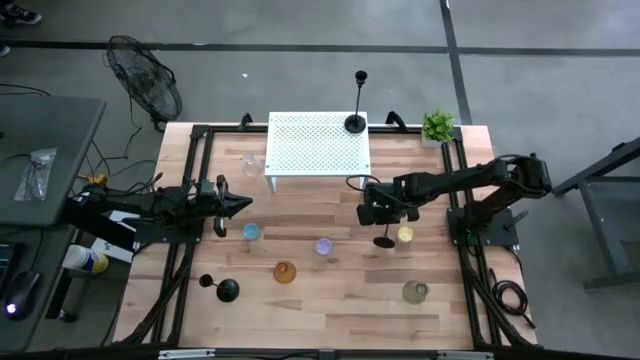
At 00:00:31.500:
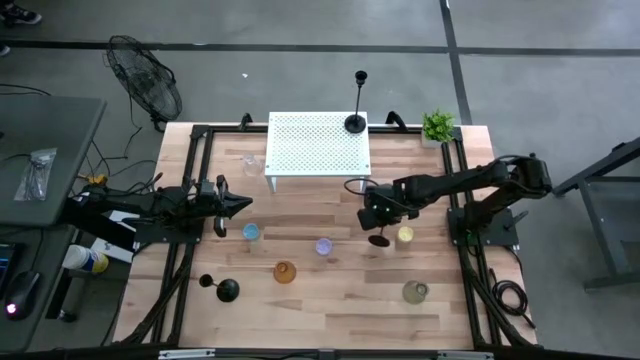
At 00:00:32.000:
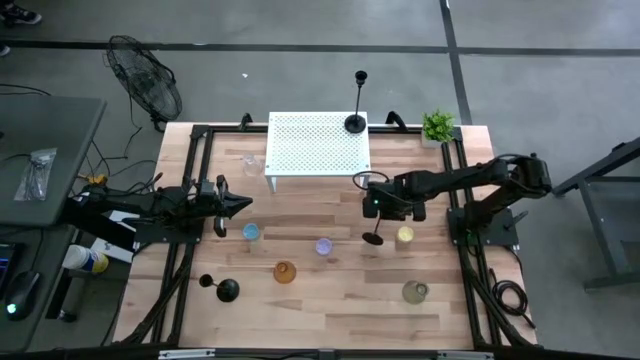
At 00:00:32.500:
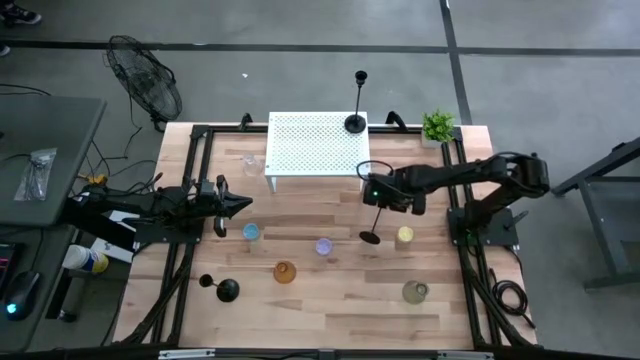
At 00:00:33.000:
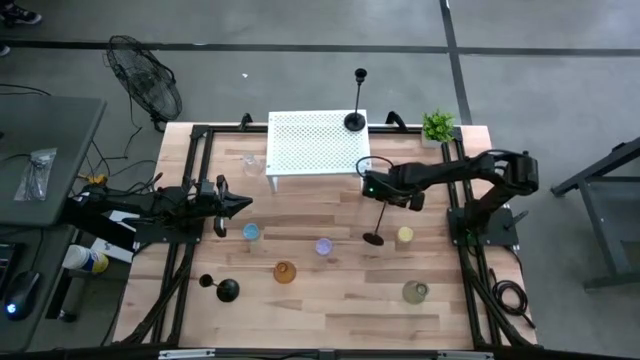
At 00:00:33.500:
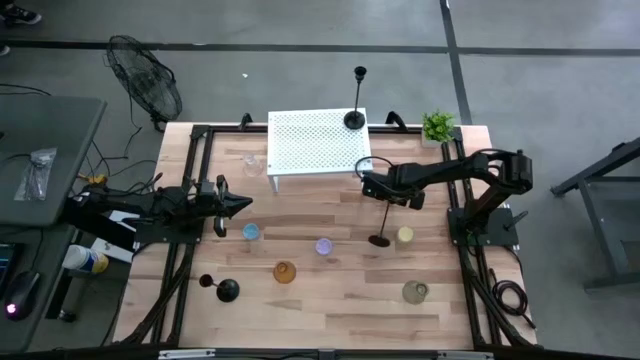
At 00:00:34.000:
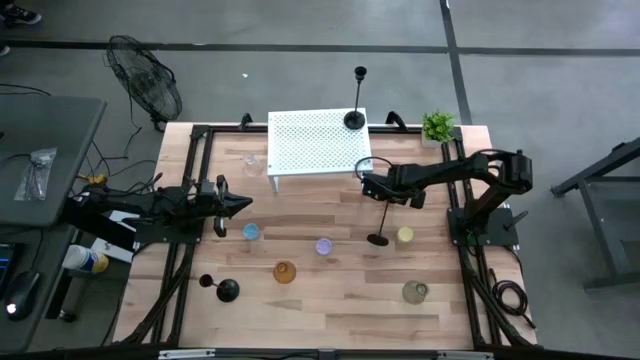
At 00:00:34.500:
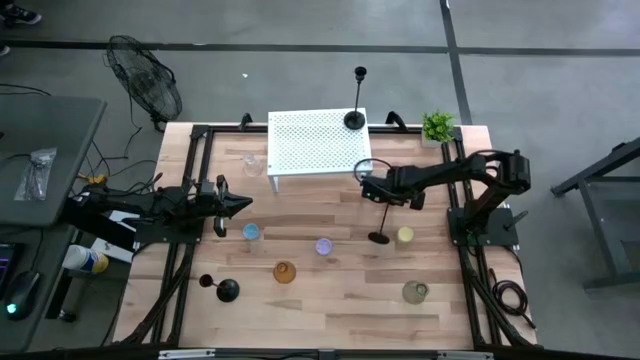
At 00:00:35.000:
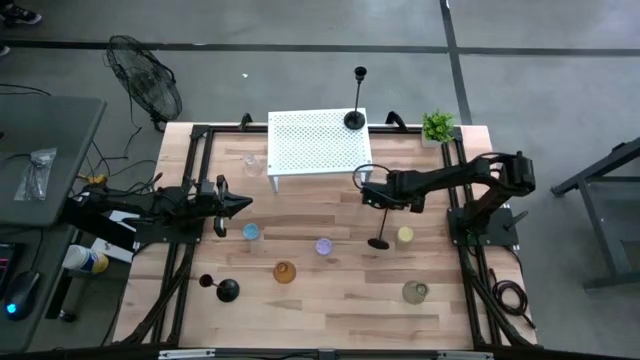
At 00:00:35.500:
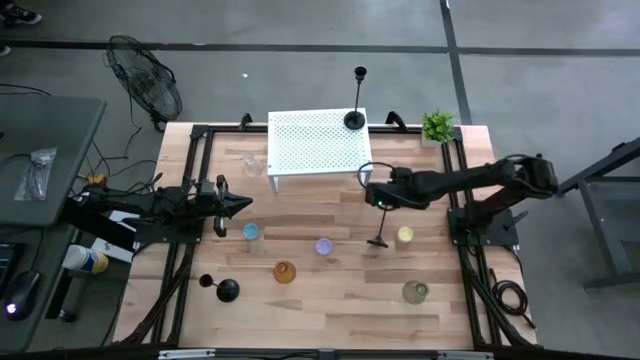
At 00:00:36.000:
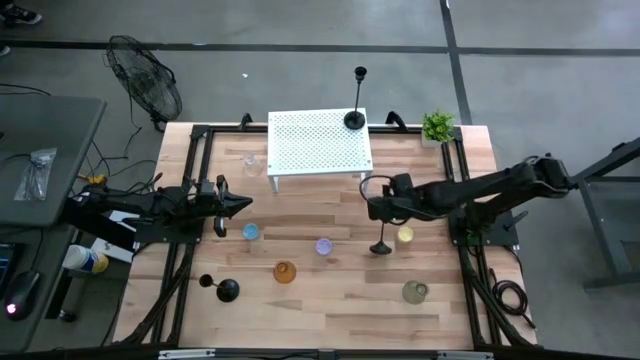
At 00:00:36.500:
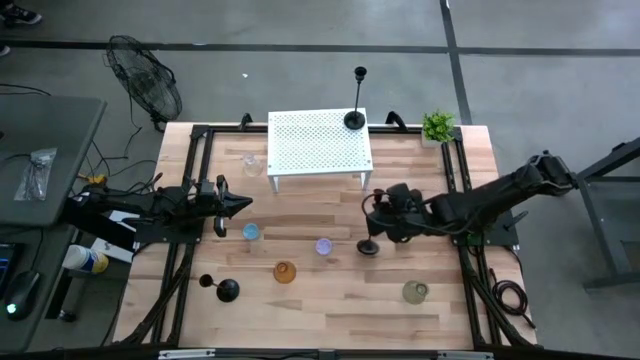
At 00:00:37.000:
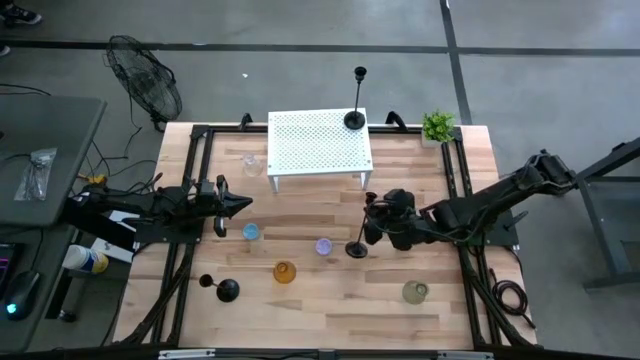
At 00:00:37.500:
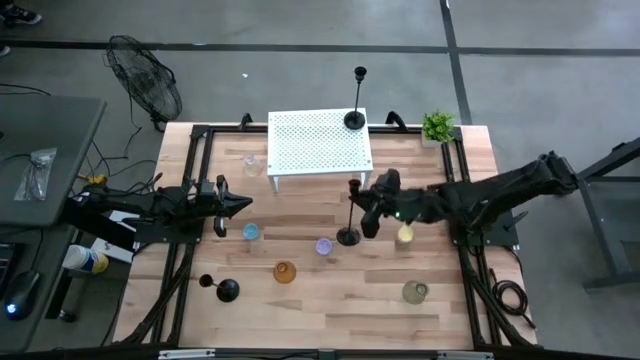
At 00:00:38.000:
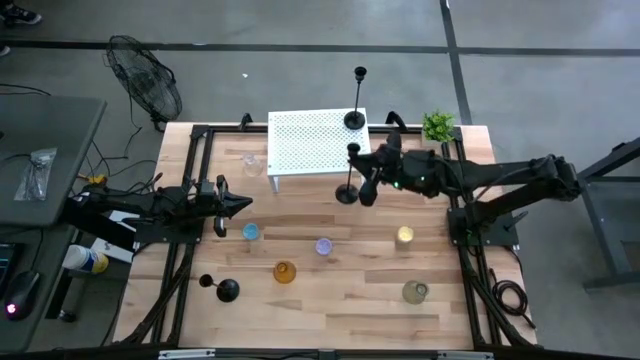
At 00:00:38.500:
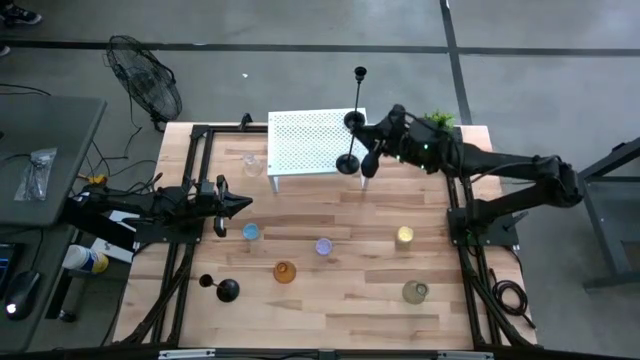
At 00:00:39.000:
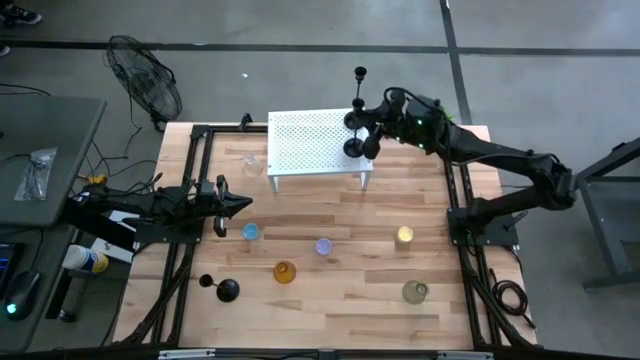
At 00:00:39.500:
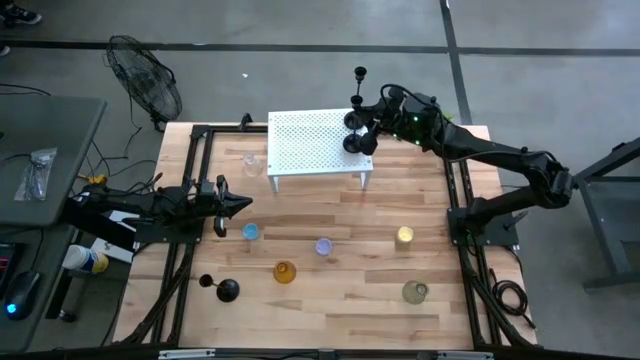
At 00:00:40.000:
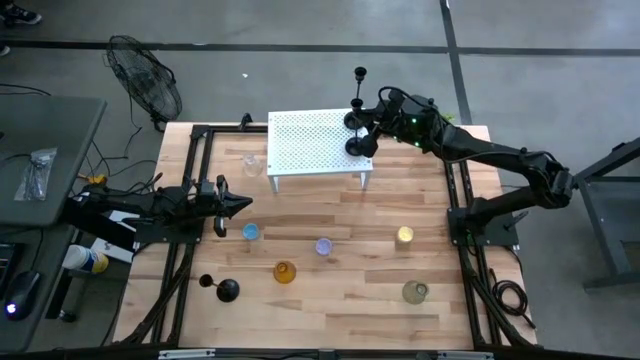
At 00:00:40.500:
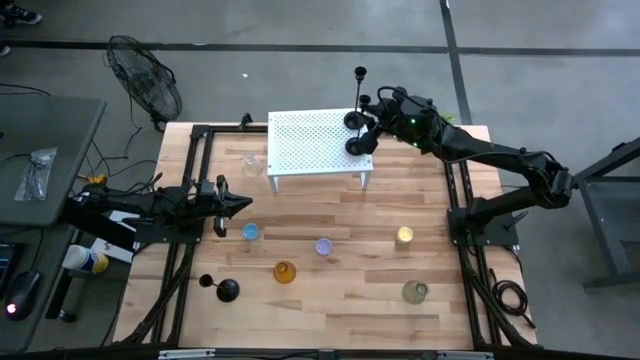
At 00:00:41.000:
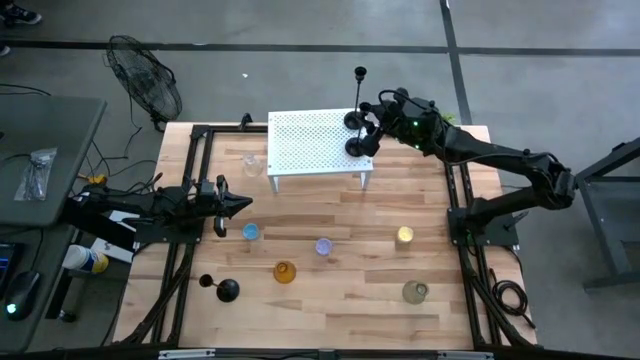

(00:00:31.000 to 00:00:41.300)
Task: Pick & Place candle stick holders
Put the top black candle holder on the shelf

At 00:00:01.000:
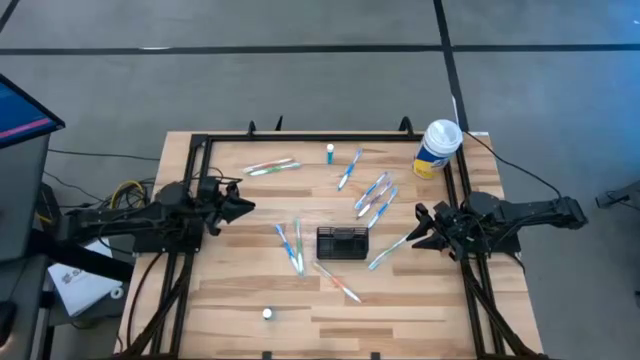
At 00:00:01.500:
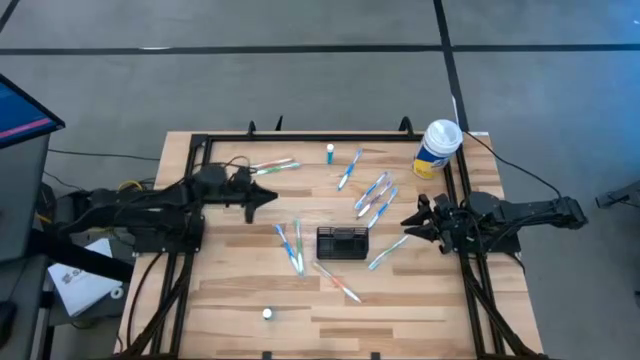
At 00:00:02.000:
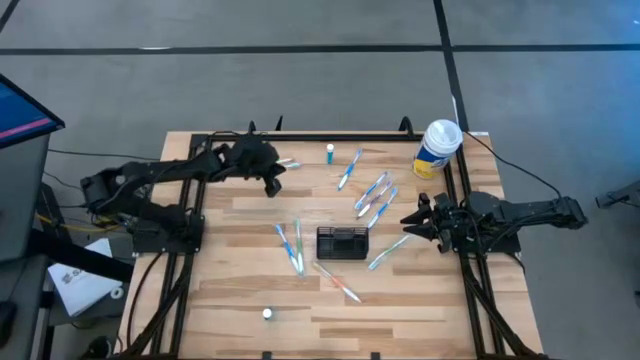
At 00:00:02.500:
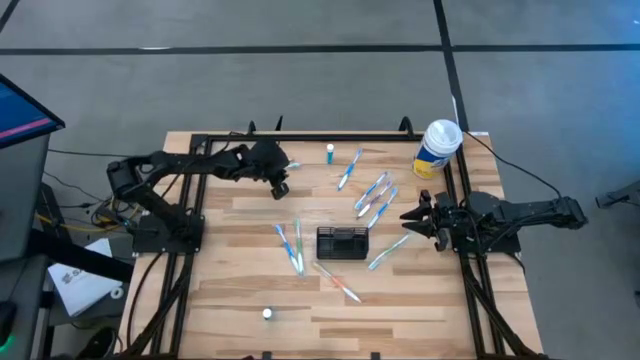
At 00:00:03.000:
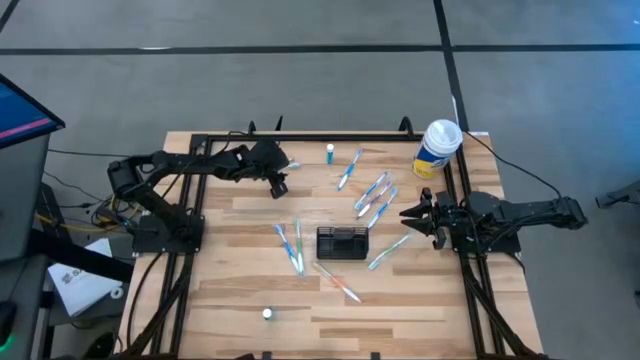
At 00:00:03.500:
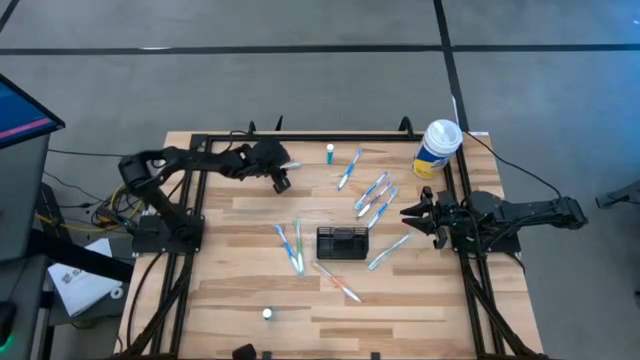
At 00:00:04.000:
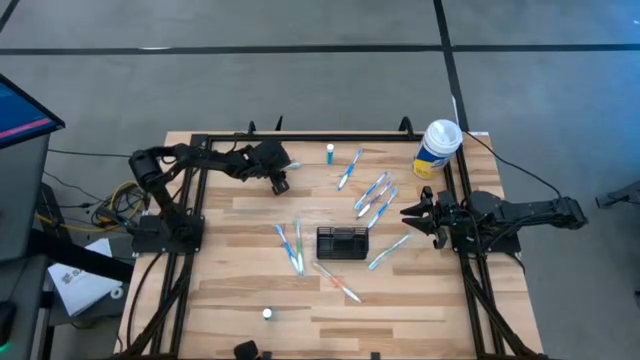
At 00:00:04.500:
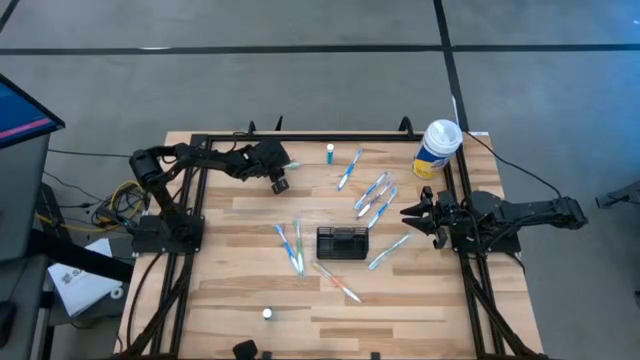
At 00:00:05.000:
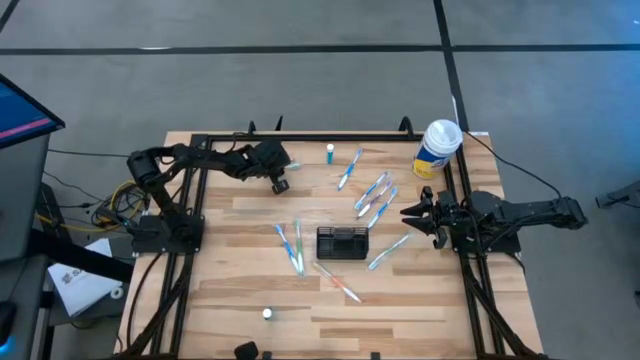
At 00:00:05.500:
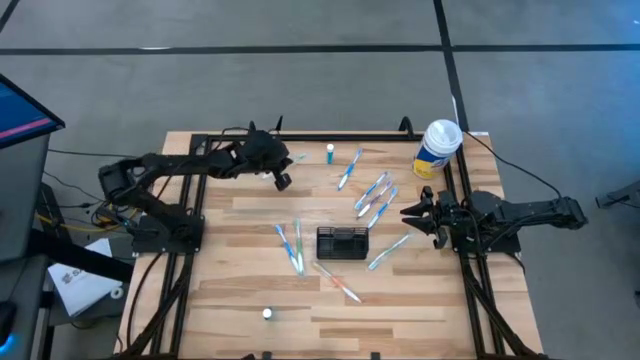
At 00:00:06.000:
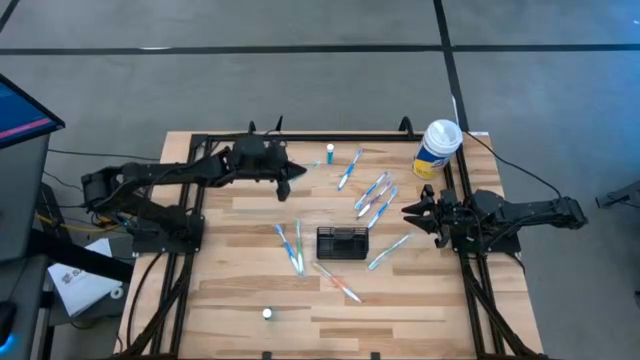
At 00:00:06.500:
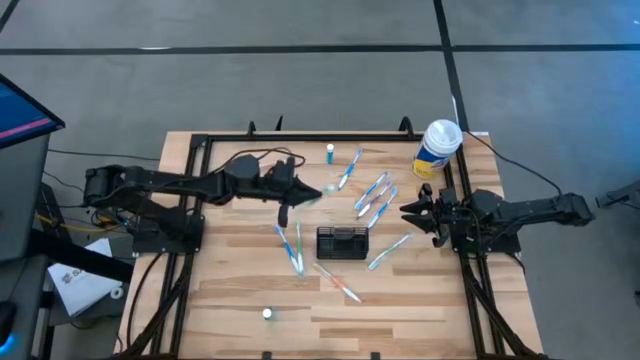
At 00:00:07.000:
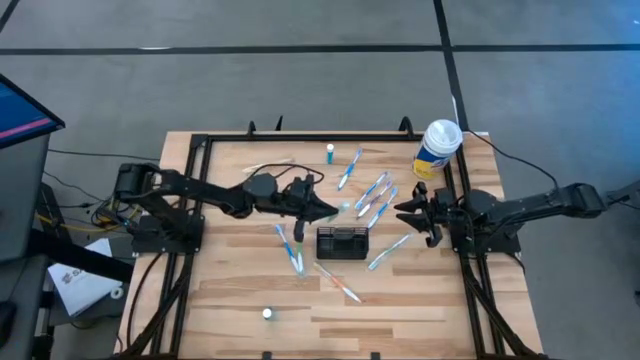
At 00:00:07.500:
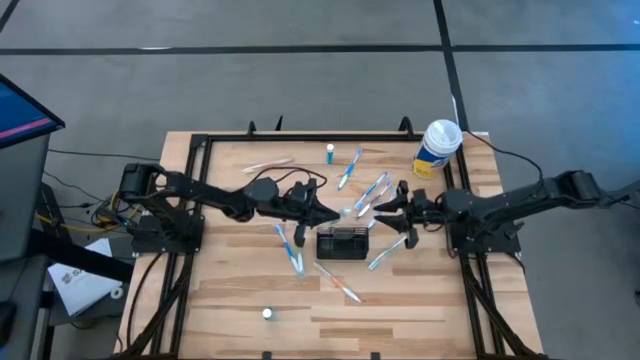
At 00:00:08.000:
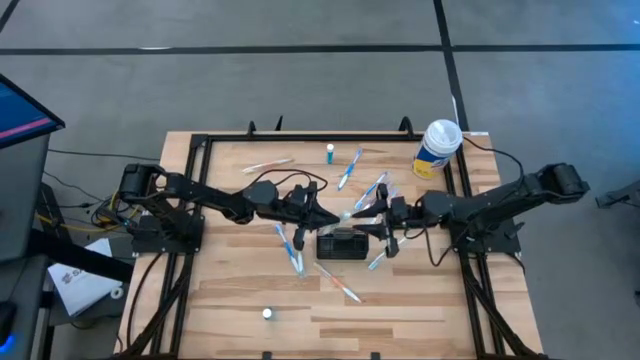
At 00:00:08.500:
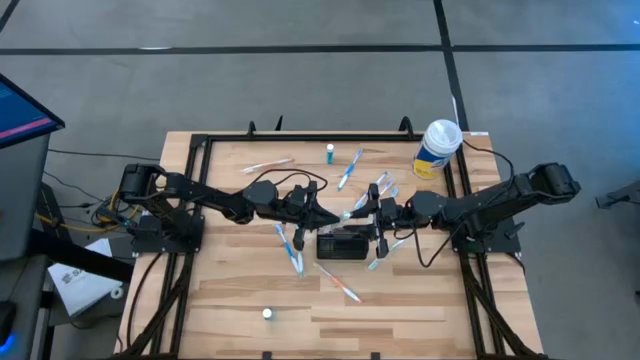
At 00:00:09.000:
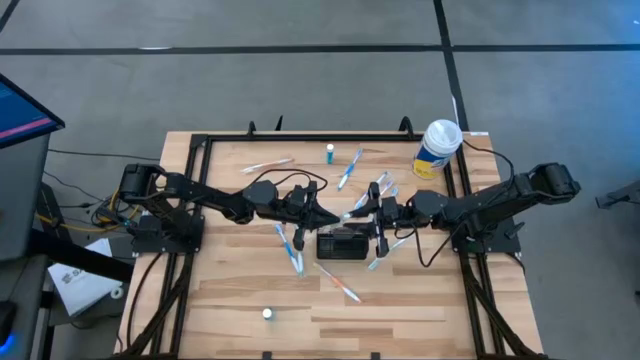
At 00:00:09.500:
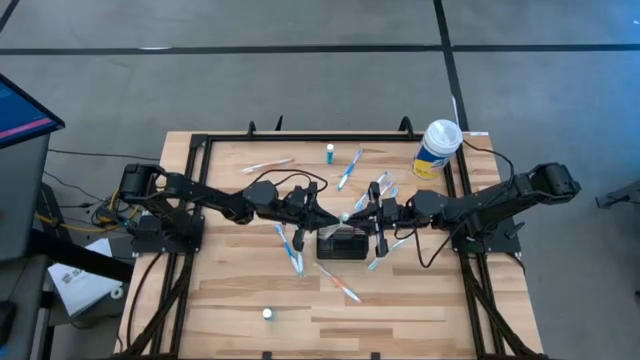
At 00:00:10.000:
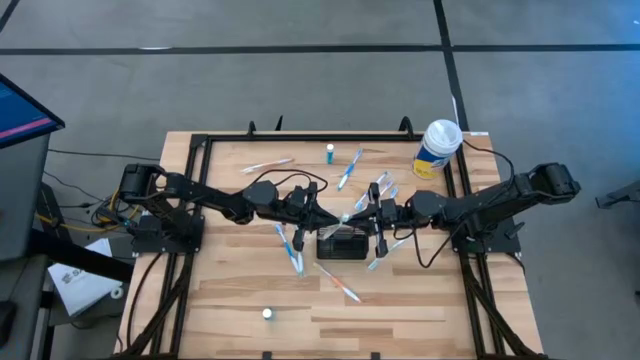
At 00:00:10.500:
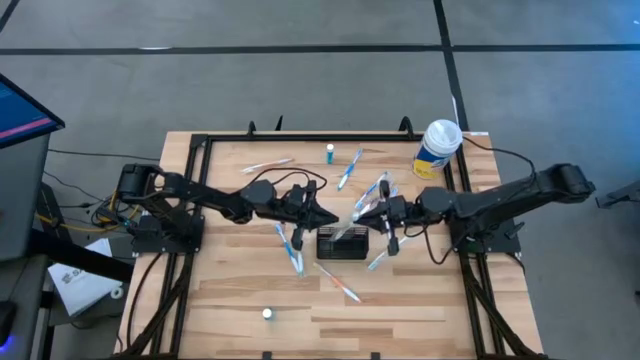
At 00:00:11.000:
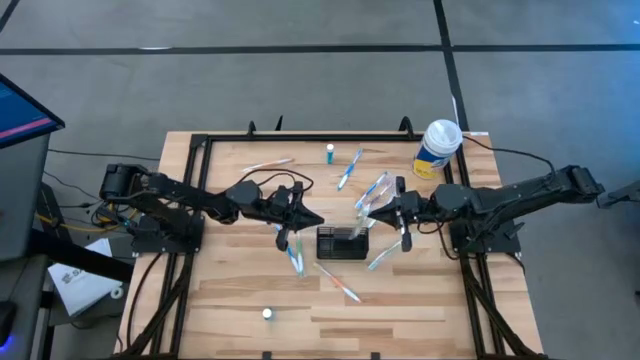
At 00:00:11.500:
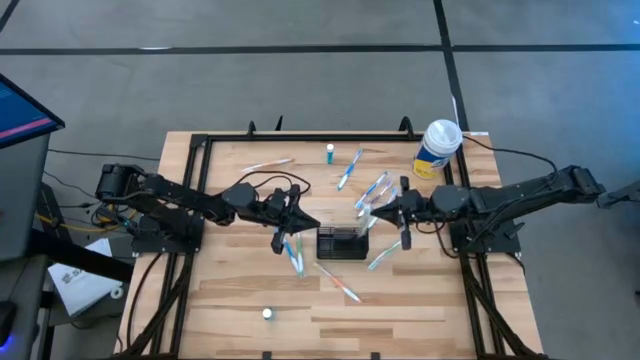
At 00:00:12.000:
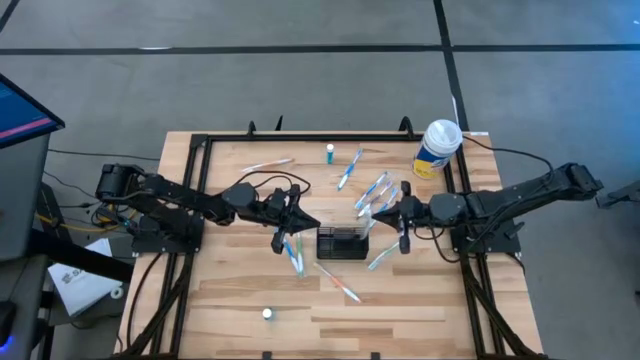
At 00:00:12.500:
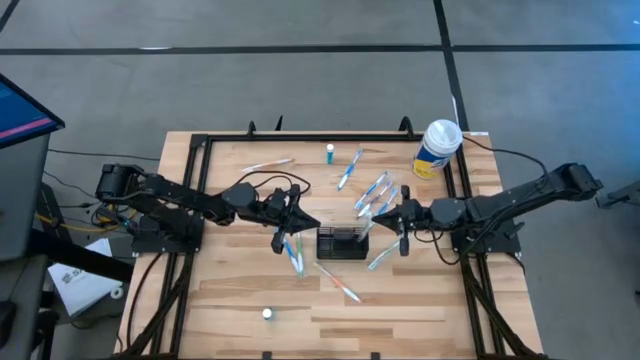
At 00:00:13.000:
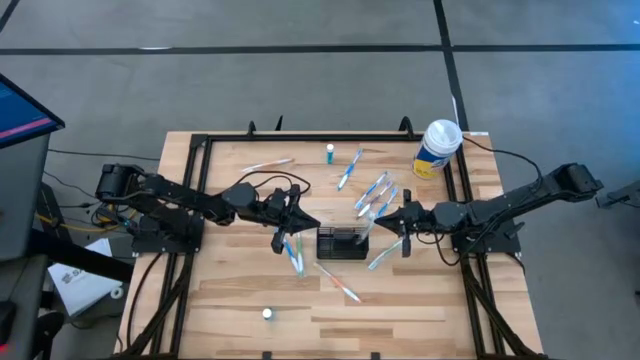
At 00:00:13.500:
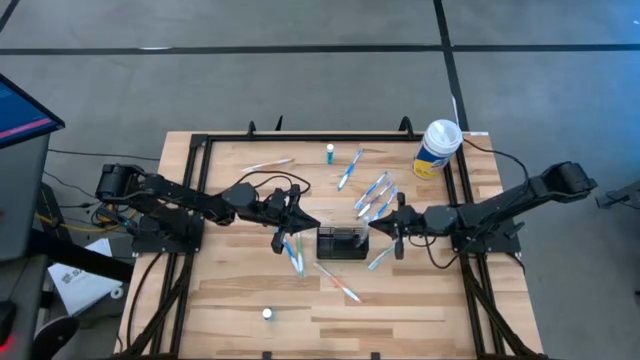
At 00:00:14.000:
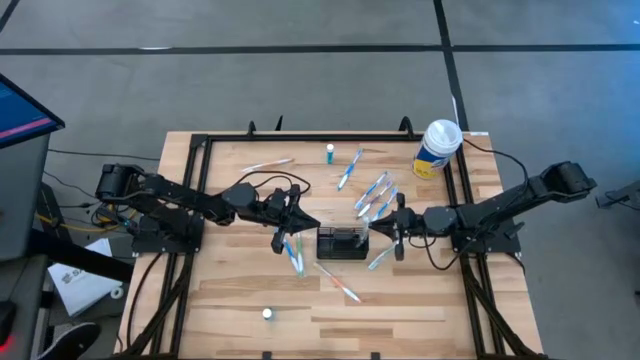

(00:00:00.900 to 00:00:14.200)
Task: Pick & Place toothbrushing station
Put the green toothbrush into the wire organizer
